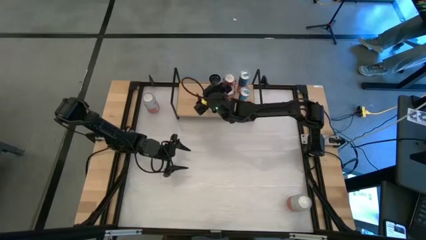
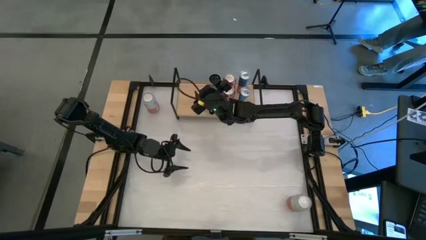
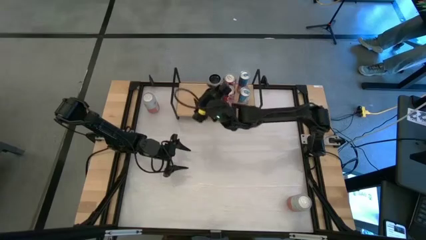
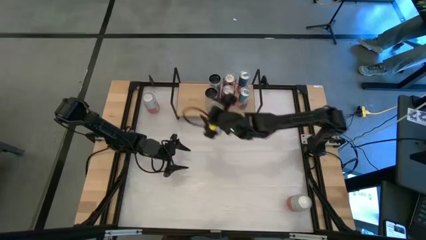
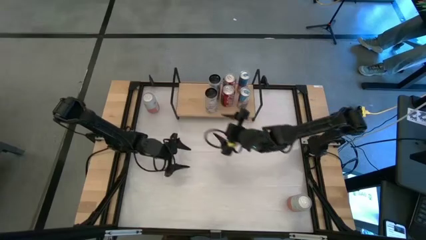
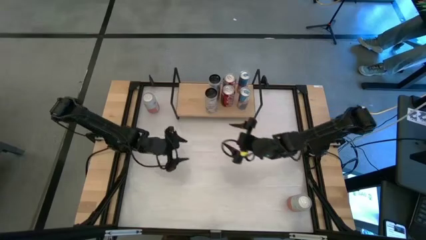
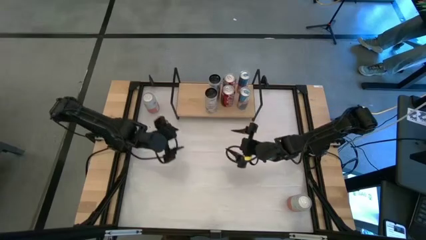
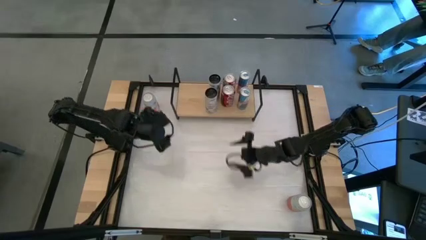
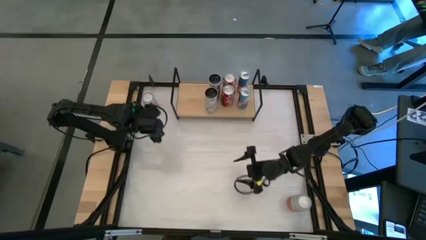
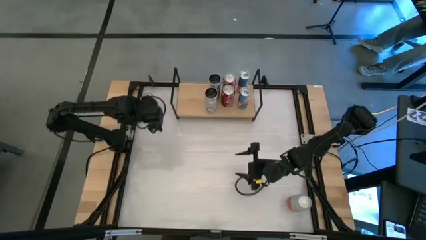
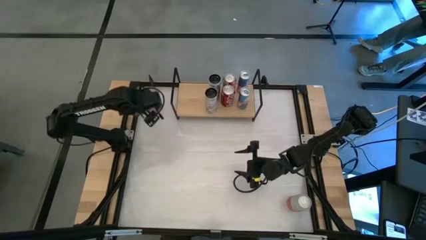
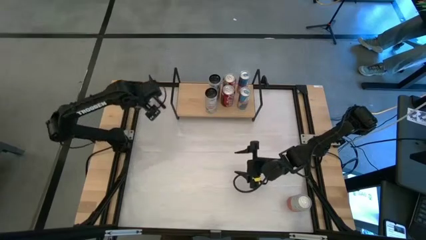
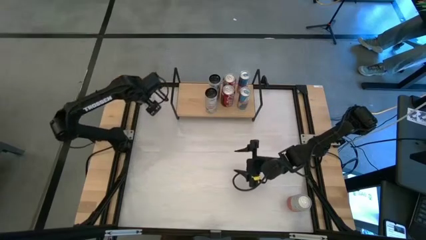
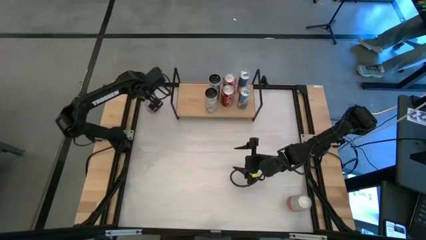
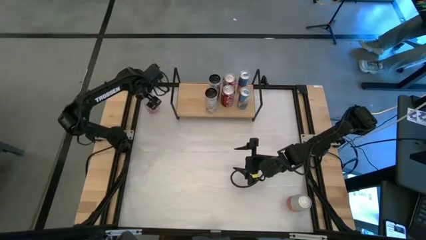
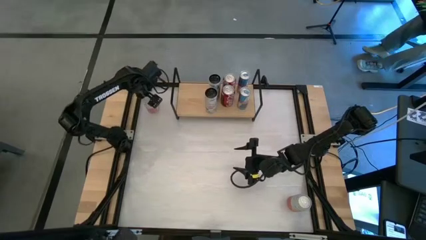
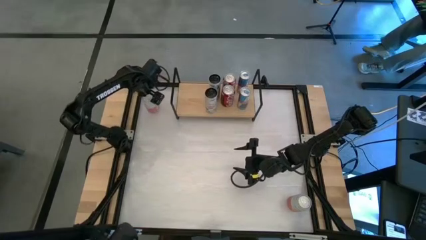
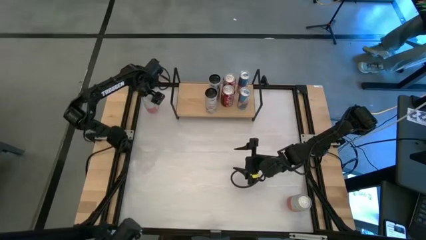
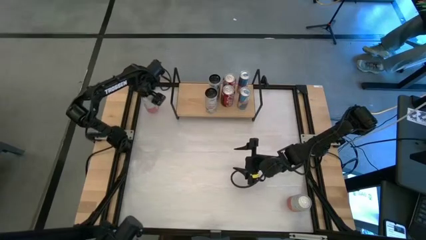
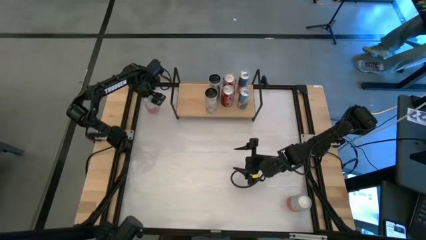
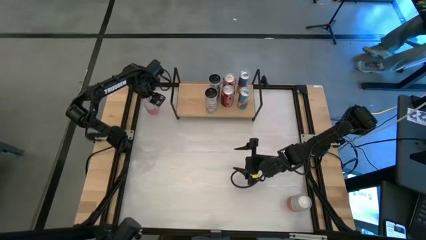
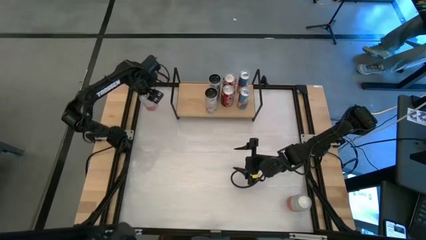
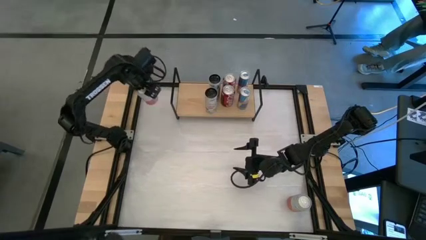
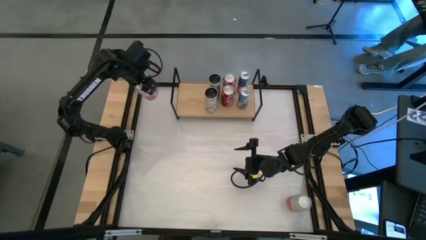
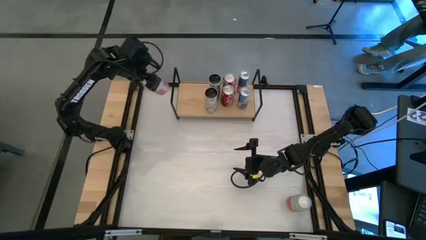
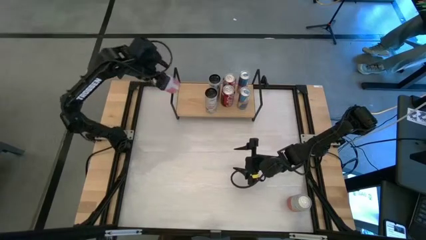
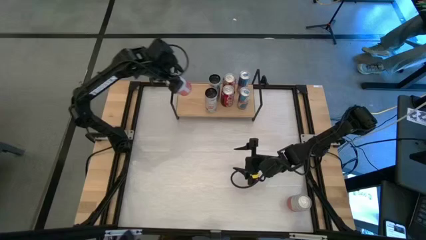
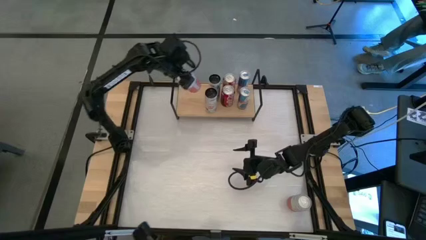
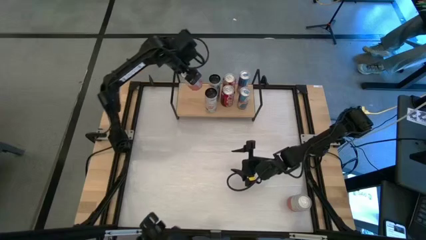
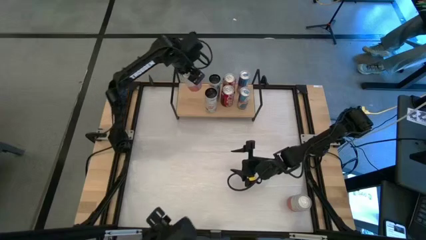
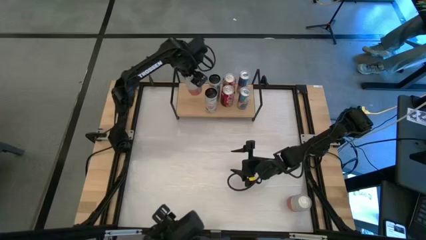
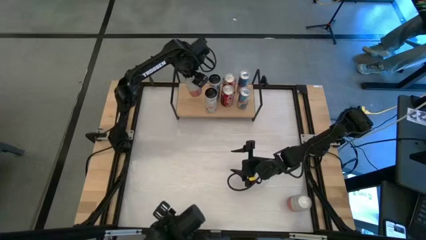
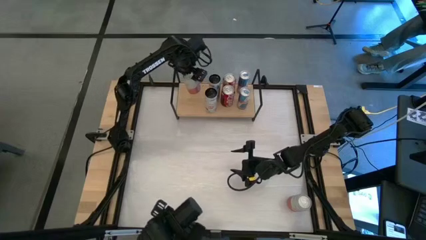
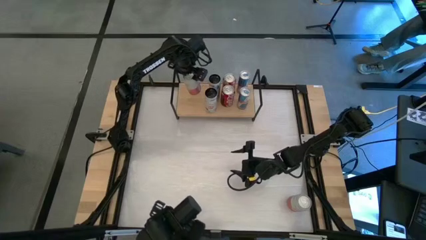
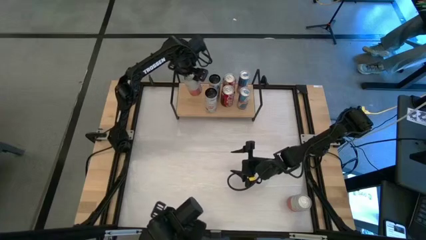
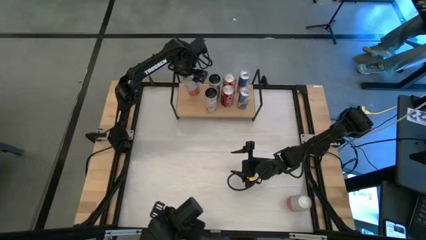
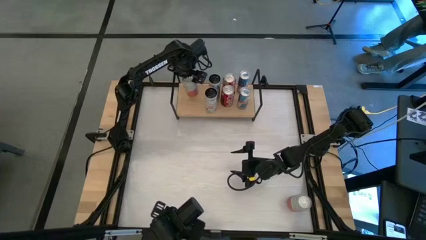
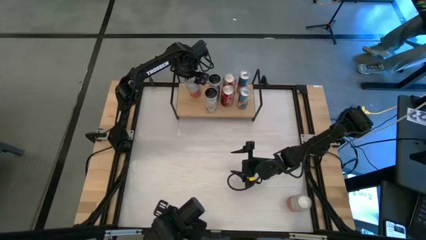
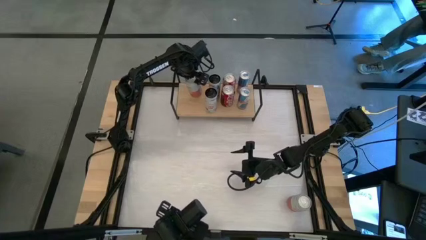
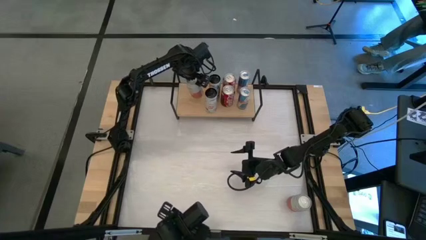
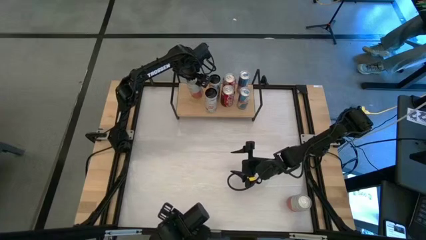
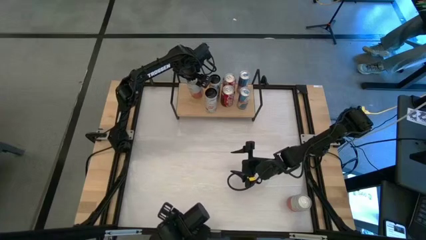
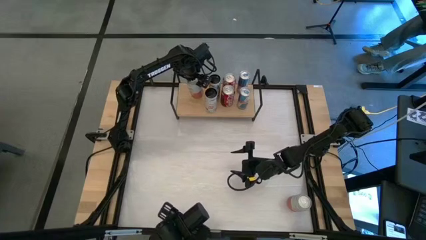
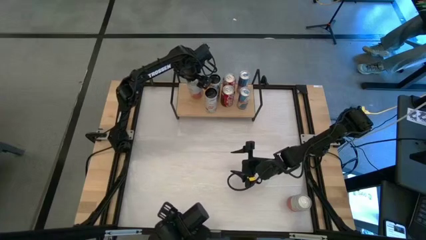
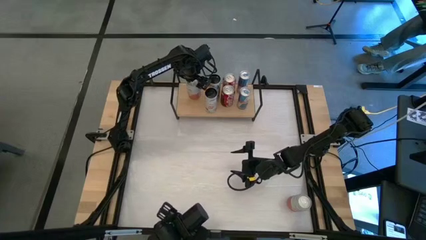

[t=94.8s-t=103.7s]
Task: Place canned beverage on shelf
Put the top white soda can on the shelf

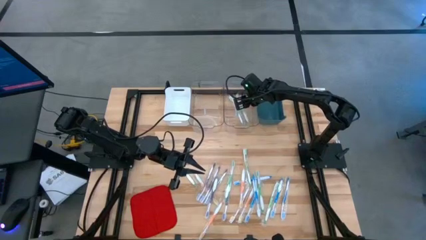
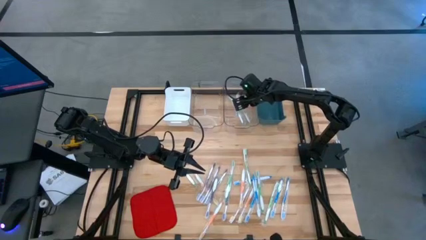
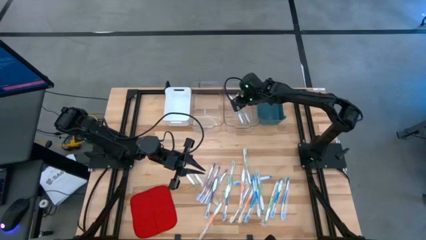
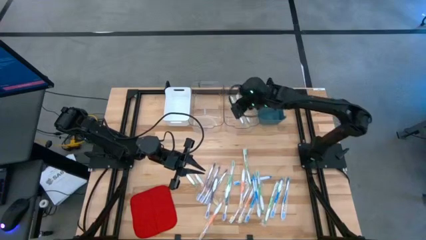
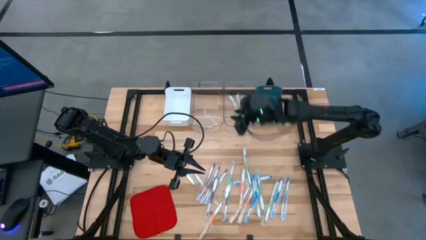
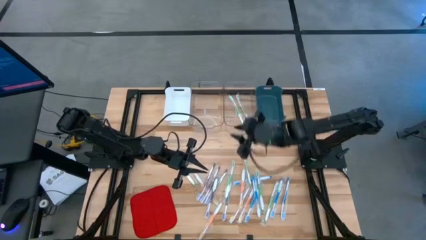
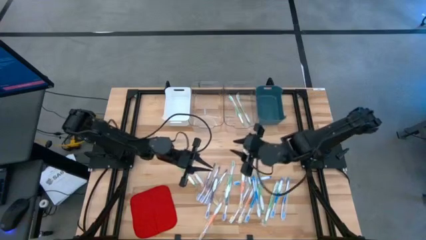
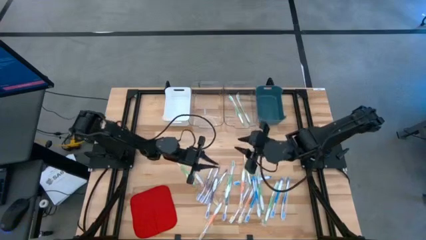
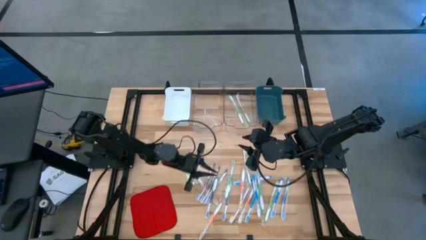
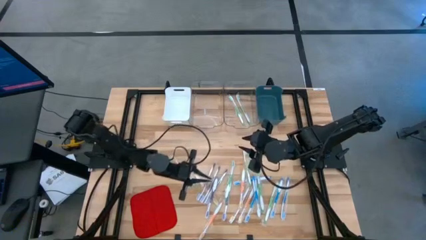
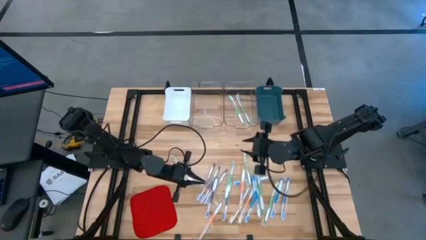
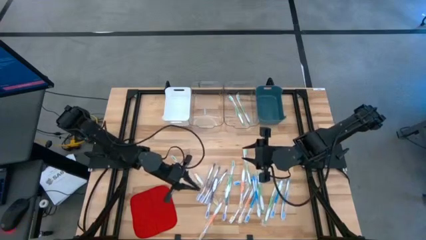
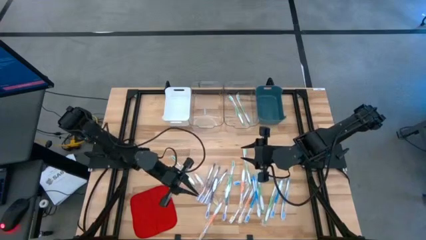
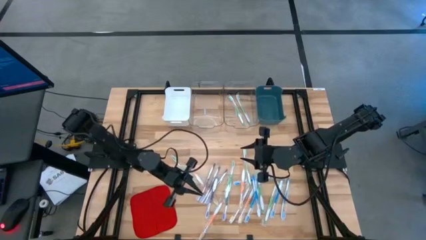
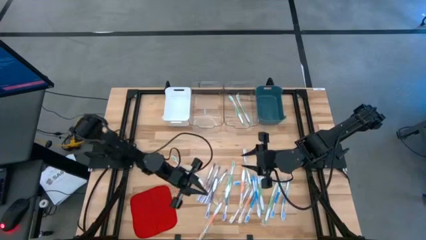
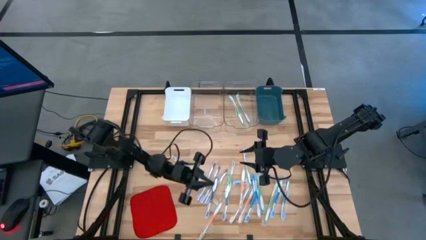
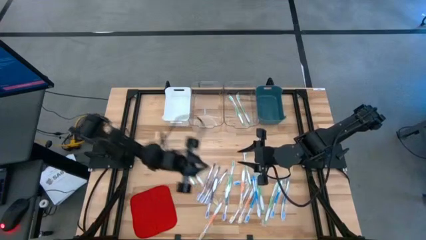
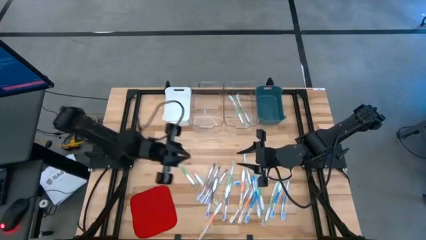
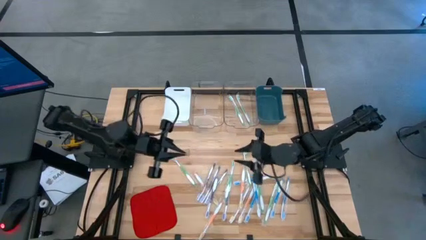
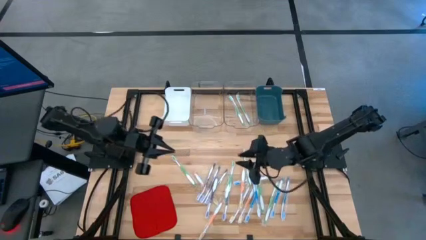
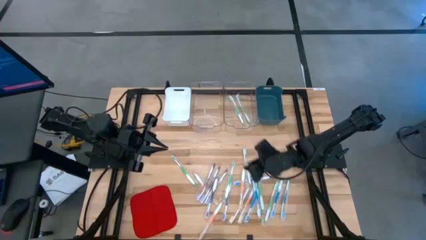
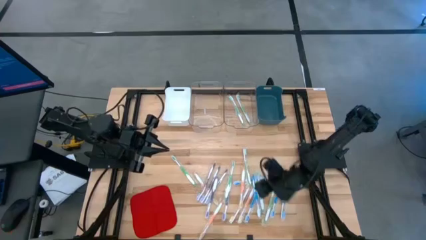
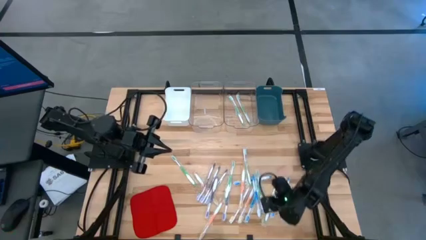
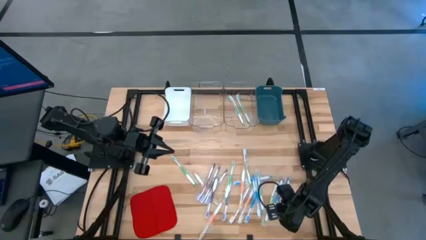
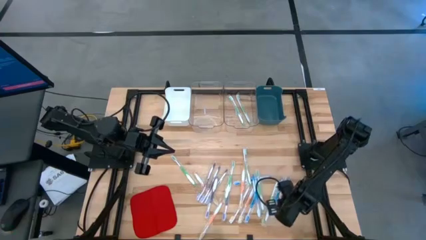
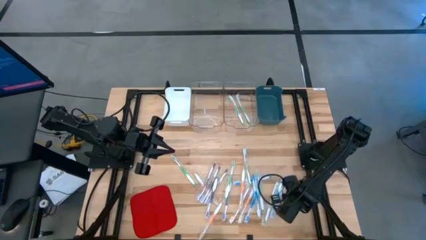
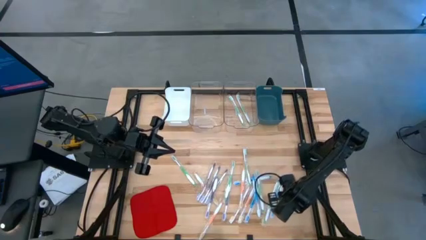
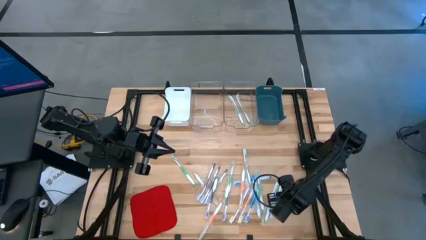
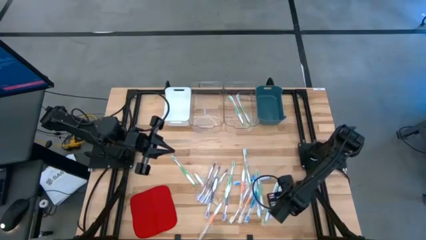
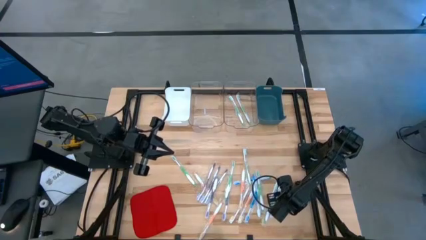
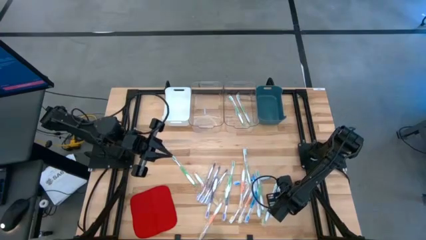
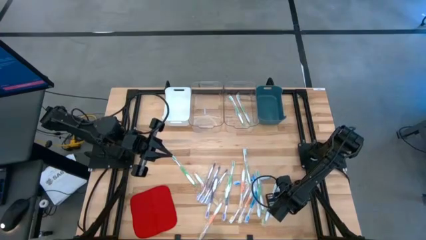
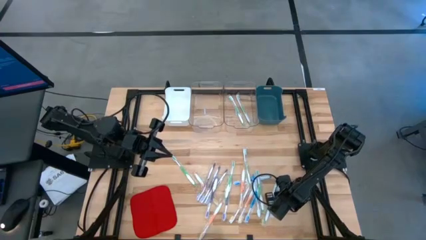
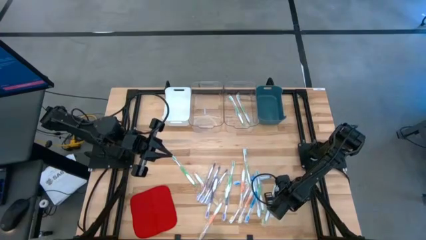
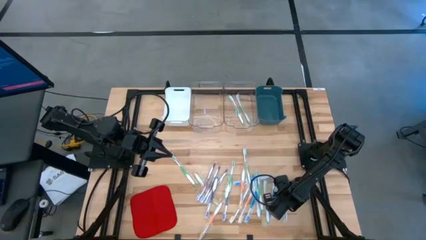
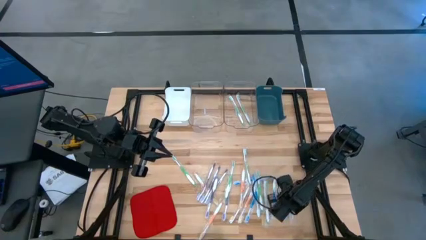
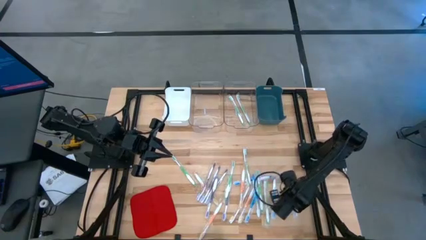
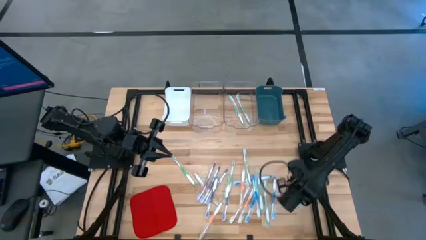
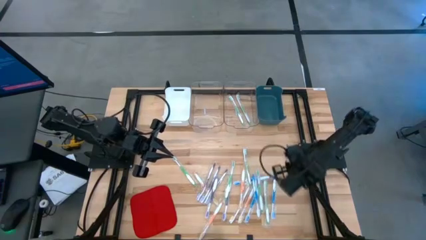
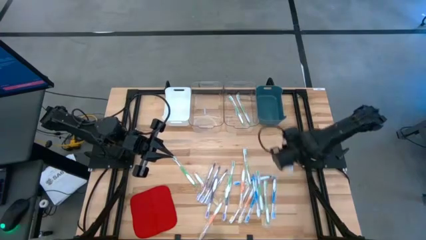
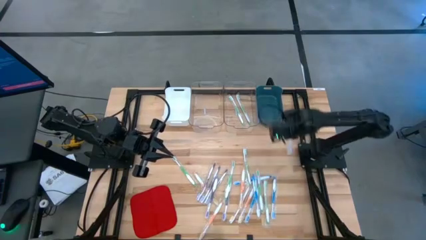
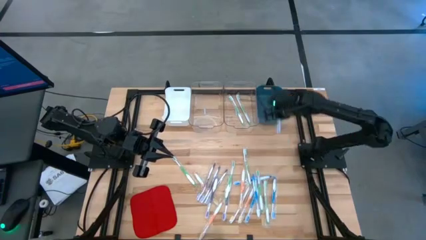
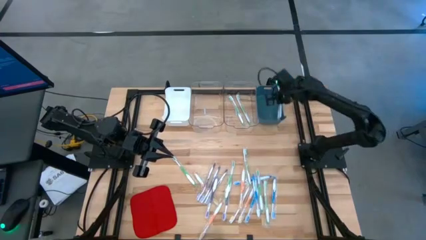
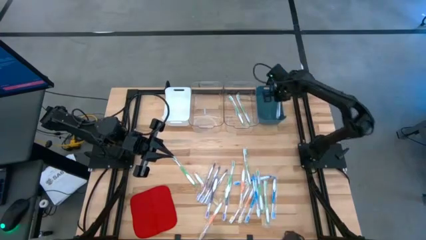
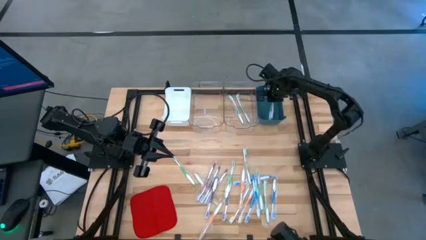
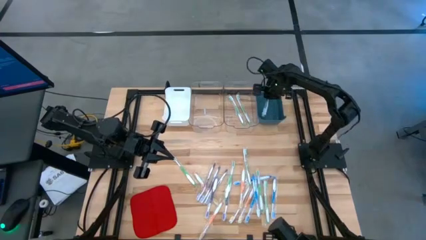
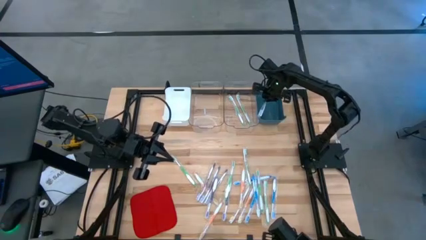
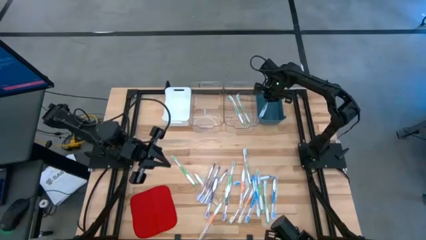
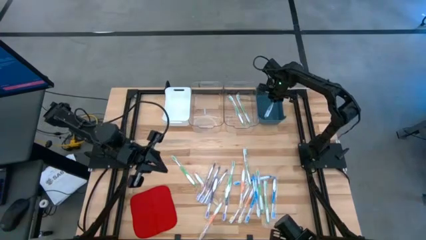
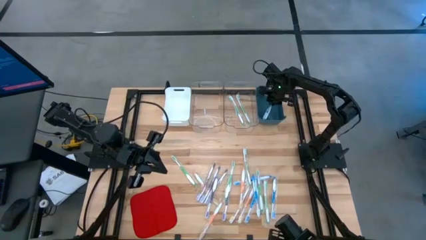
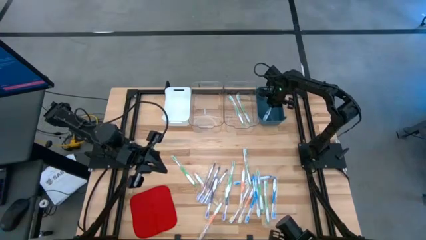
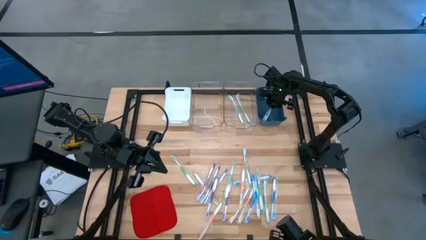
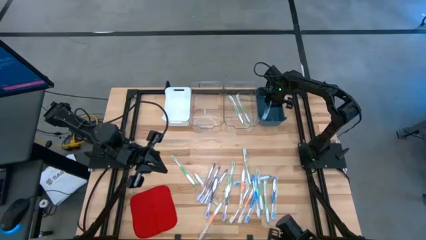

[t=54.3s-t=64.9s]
Task: Pick & Place Toothbrushes
Put the blue toothbrush into the blue bin
